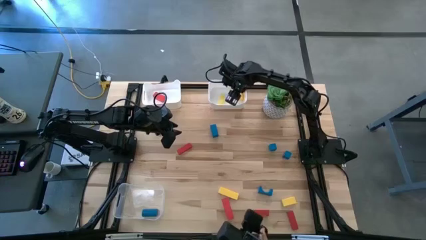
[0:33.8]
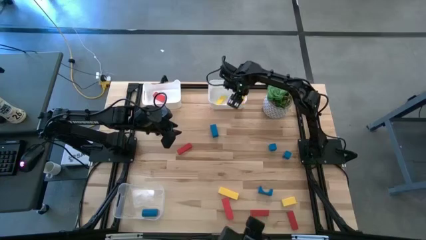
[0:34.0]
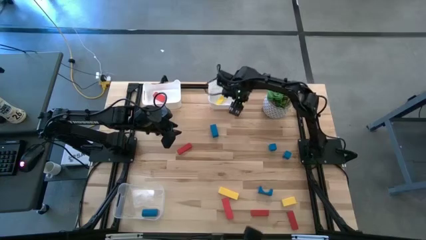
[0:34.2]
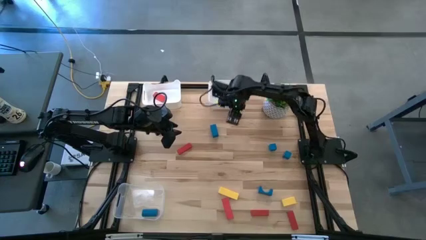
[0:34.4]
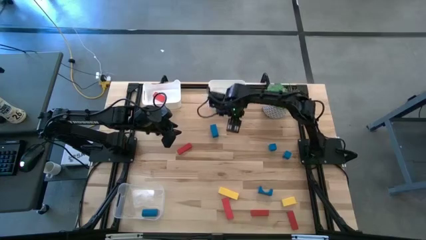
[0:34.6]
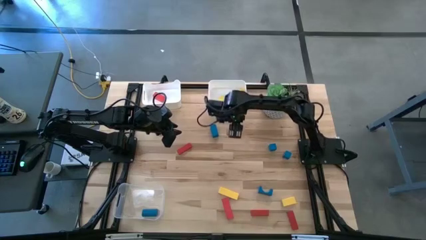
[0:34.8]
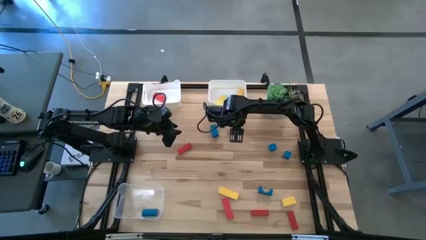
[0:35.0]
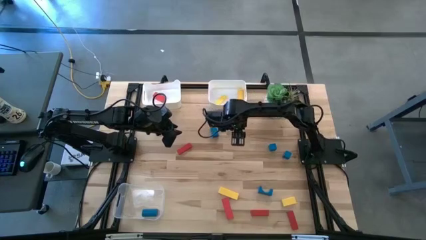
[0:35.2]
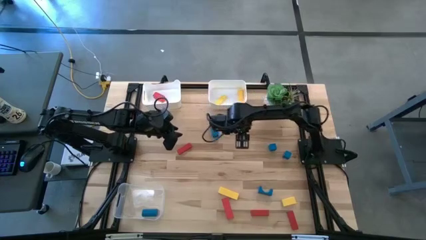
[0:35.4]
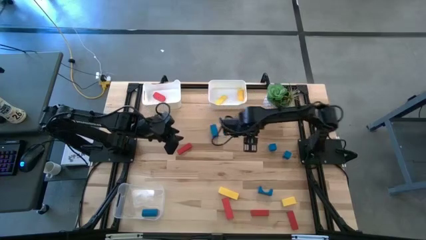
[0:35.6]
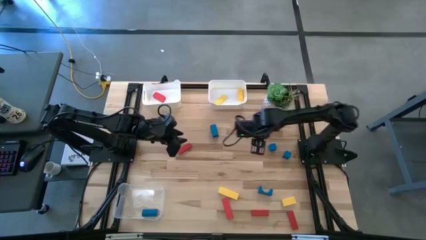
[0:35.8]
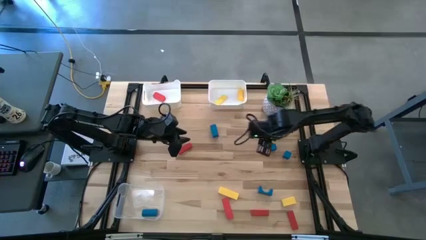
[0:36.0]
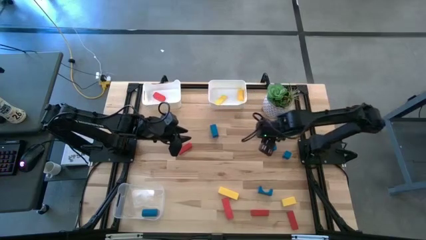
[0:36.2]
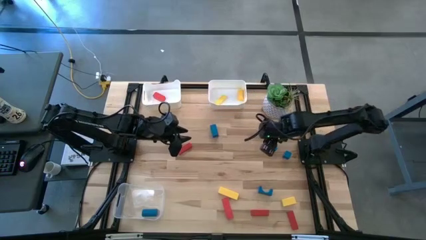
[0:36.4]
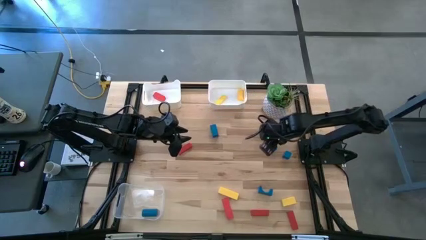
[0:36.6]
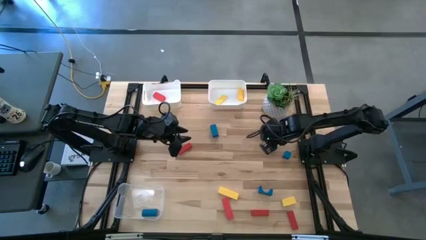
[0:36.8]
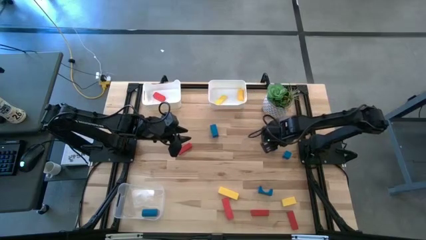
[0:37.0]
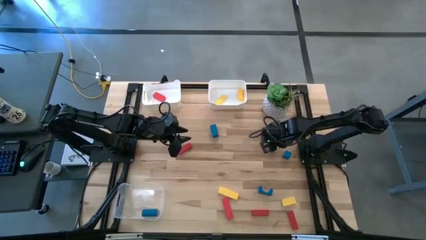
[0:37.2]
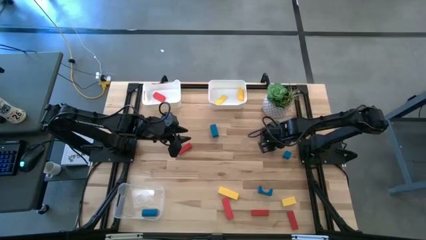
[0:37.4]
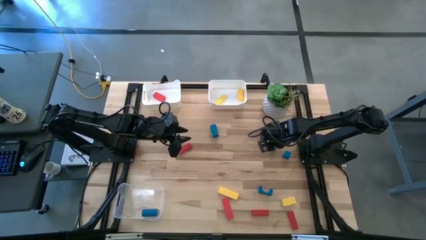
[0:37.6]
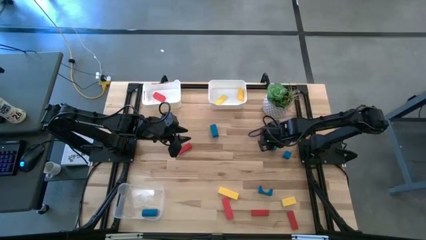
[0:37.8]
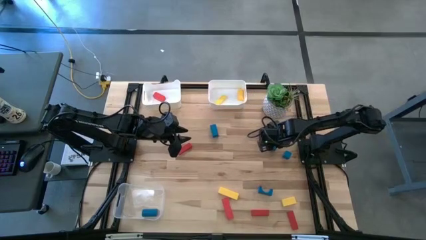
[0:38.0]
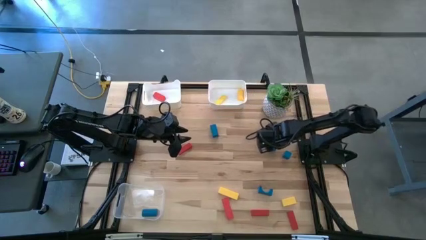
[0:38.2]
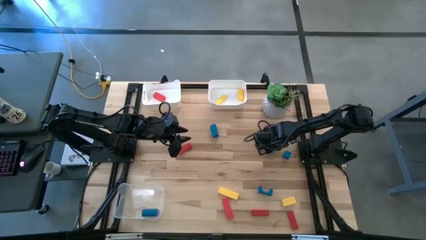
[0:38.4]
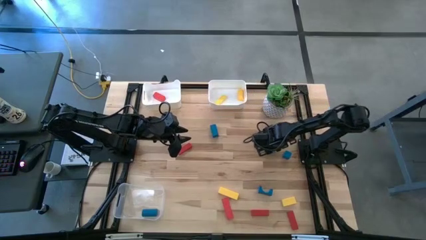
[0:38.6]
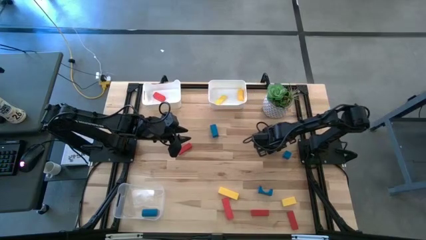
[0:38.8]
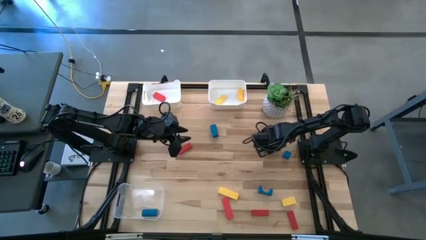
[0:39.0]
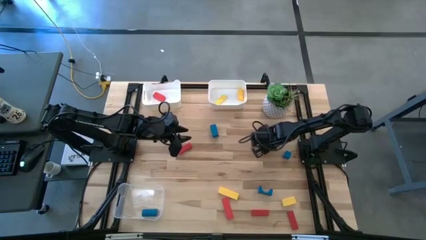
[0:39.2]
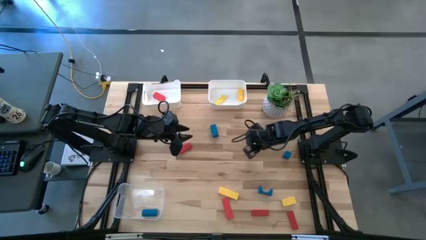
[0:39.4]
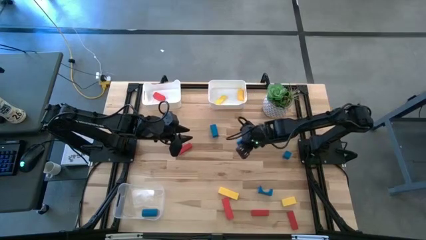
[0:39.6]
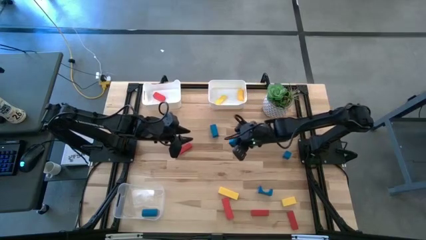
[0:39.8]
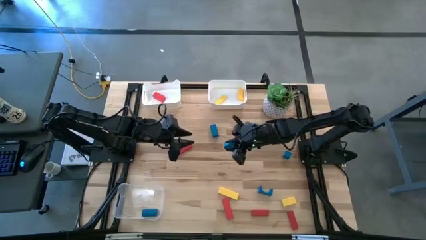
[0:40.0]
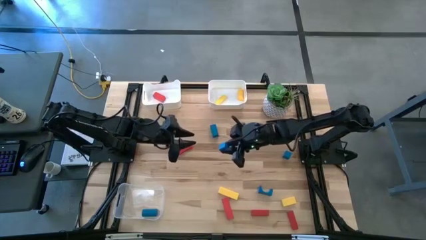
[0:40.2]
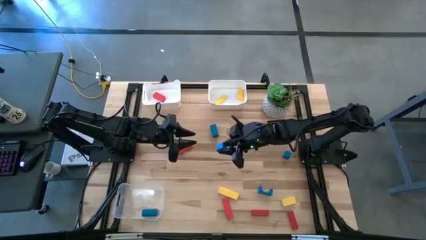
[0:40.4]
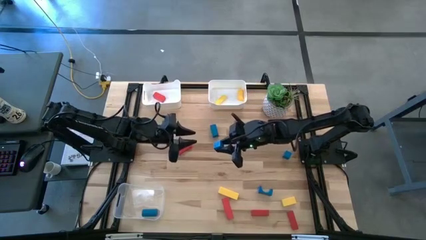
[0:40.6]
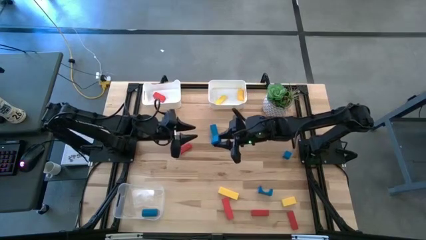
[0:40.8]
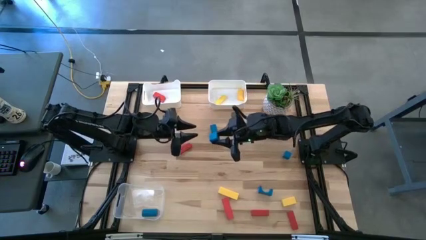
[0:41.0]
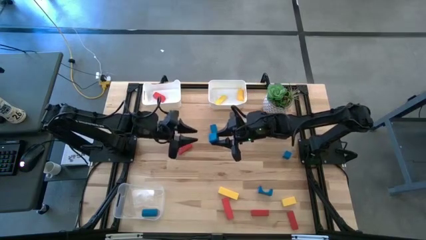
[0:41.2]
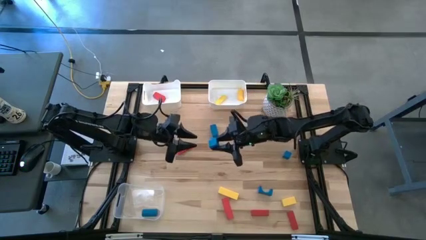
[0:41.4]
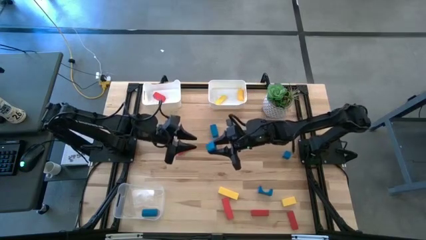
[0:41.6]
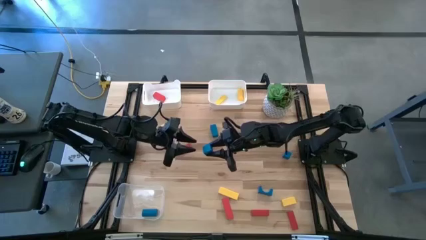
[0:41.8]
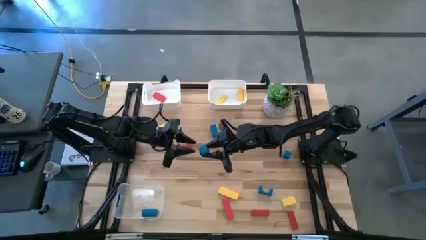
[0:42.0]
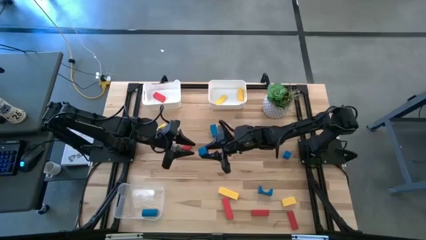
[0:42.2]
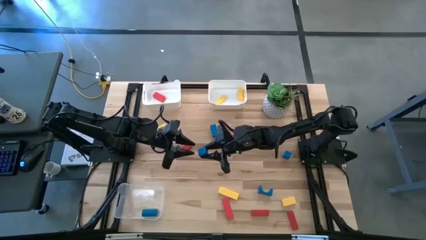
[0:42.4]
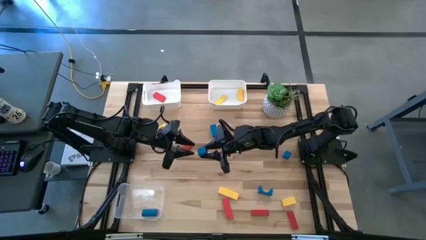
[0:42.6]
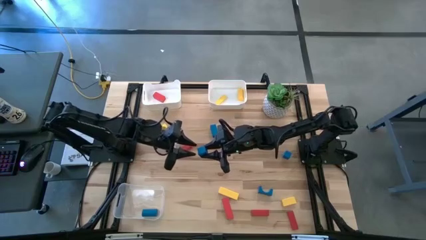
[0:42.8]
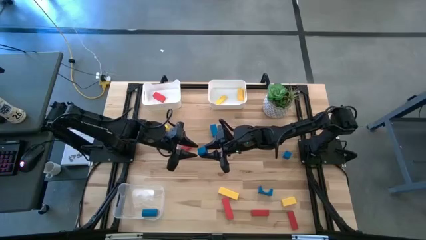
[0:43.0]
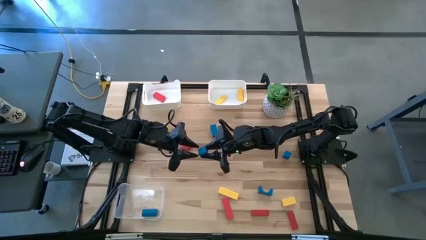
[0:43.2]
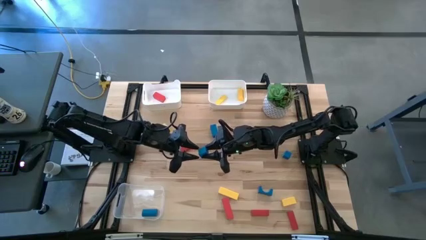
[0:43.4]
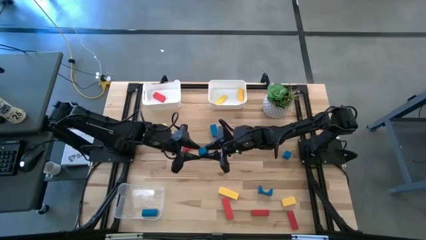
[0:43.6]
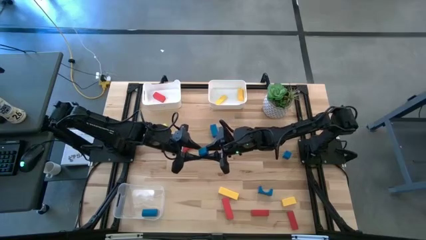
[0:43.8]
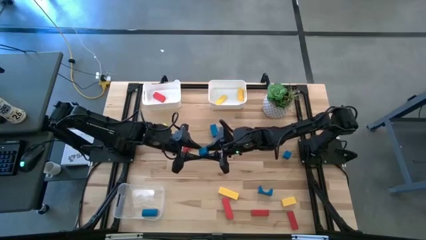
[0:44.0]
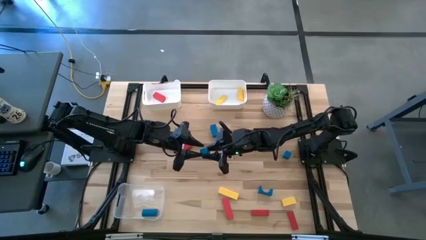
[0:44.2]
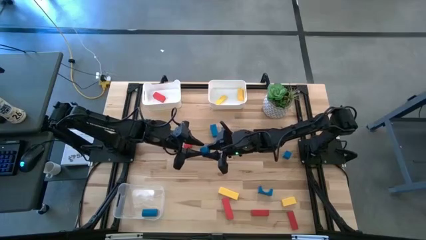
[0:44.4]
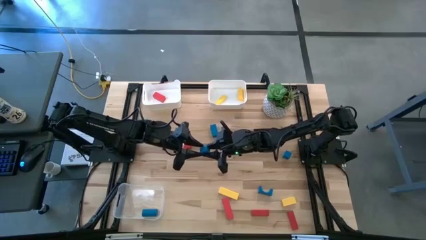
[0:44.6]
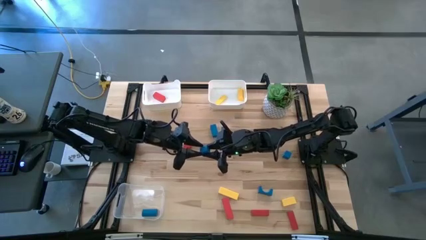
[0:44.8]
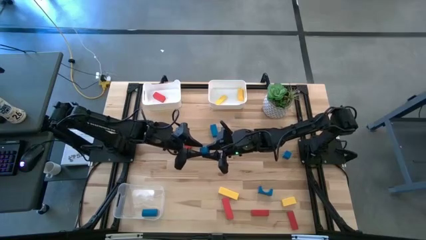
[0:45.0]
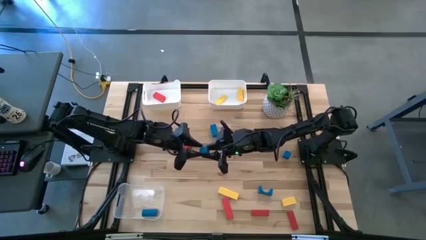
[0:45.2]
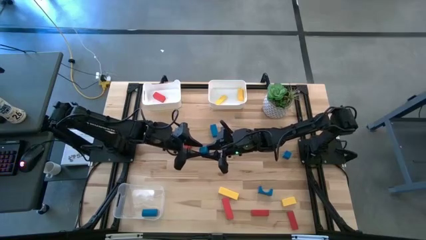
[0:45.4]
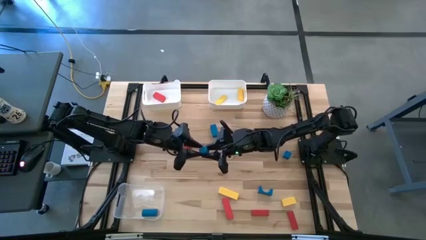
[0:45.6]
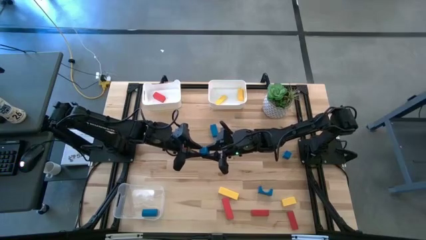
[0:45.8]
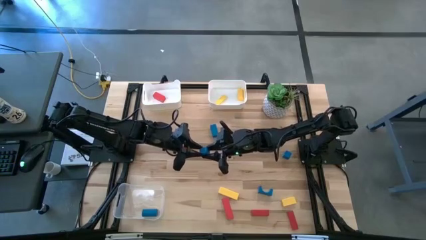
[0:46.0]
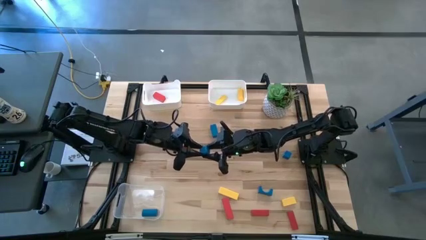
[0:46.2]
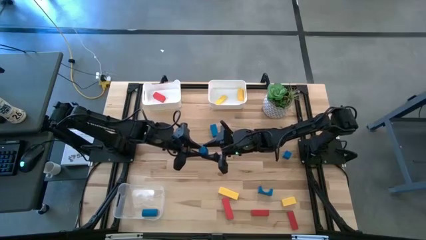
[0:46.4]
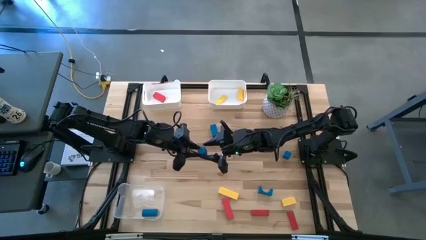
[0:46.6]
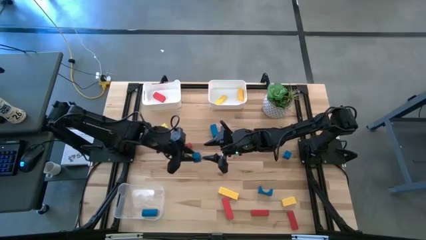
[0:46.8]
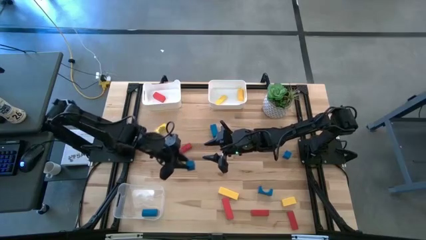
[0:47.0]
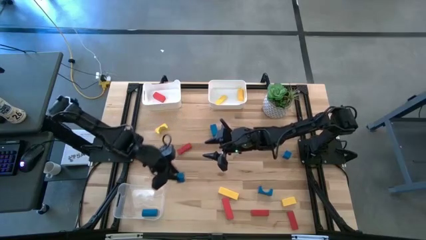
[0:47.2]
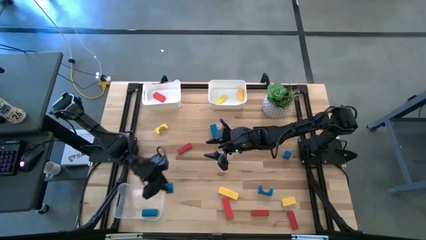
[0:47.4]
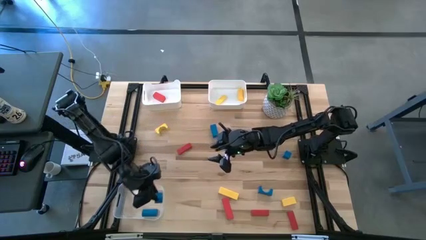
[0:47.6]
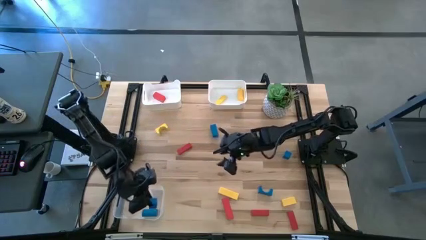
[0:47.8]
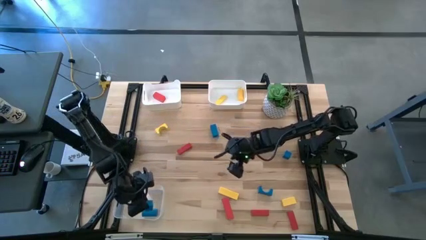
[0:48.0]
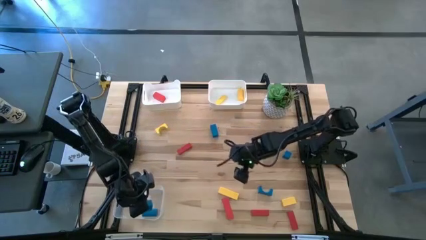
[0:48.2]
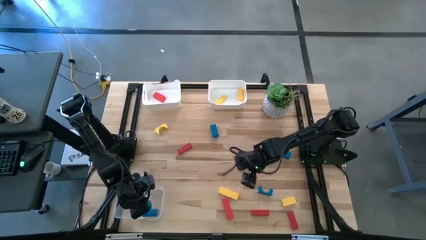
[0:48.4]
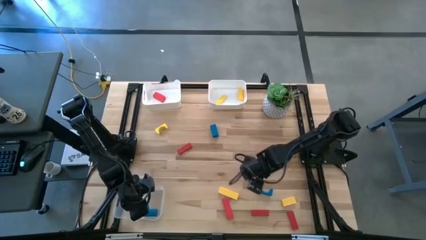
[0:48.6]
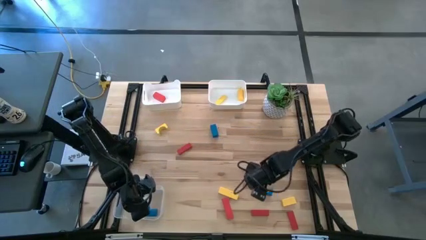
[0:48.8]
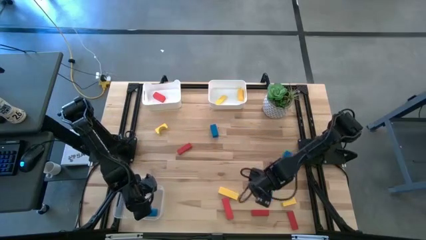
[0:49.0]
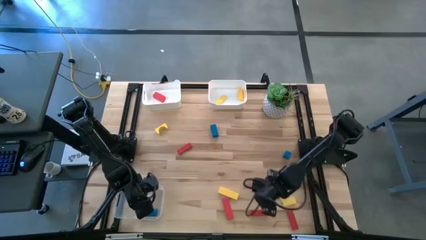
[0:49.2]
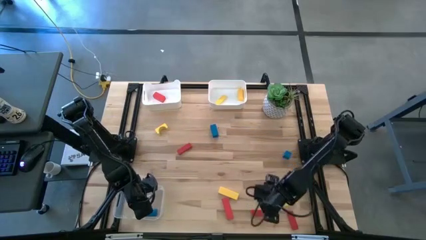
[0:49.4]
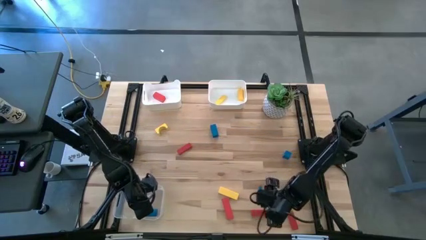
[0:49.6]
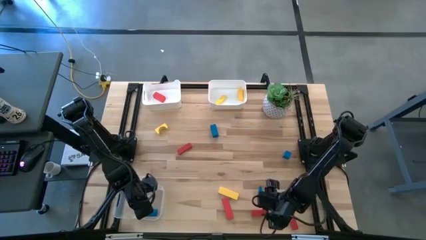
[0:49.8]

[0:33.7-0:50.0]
Task: Sort & place blocks by color
Put the blue block into the transparent bin

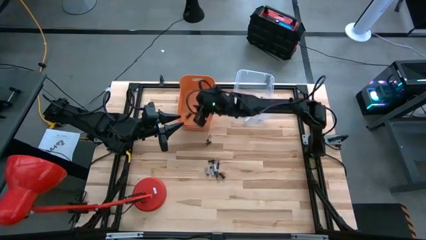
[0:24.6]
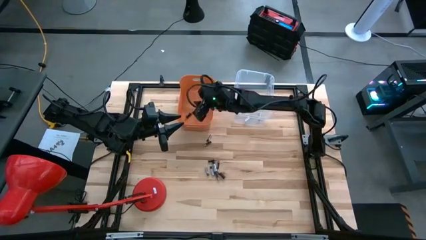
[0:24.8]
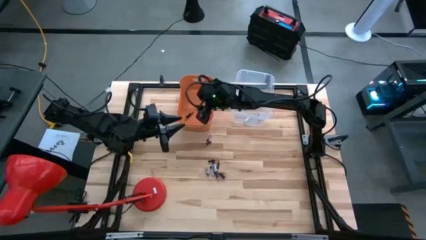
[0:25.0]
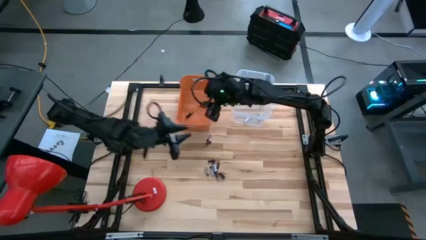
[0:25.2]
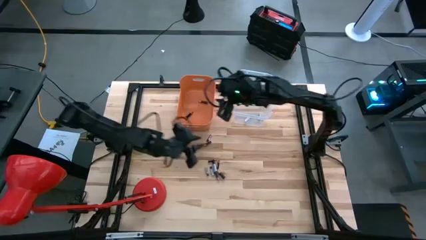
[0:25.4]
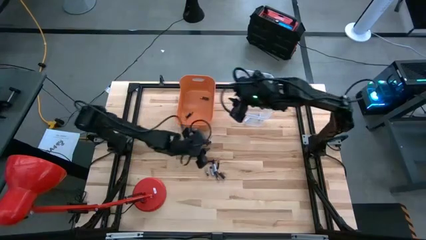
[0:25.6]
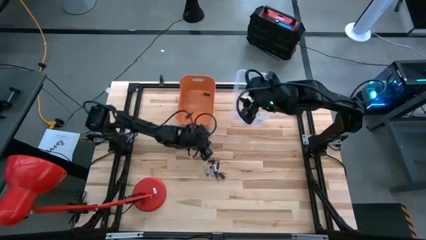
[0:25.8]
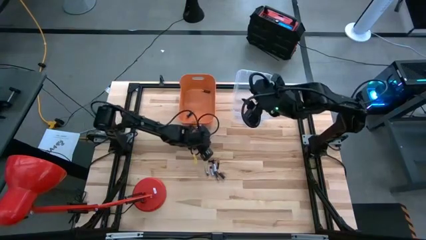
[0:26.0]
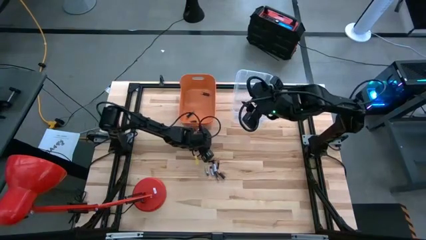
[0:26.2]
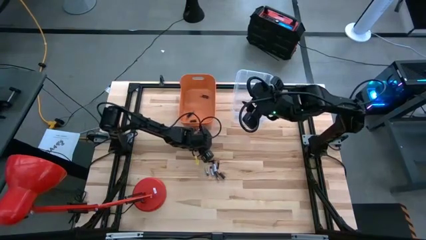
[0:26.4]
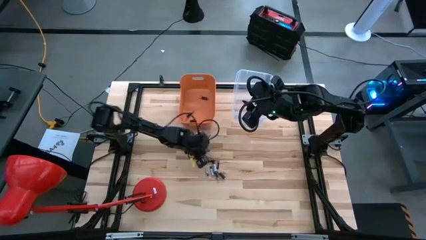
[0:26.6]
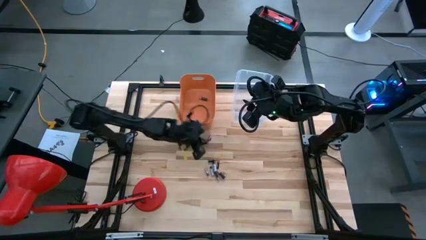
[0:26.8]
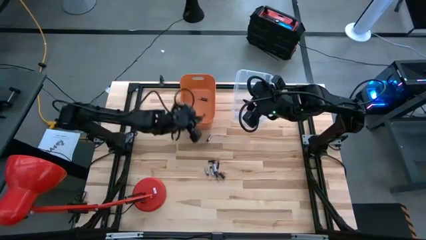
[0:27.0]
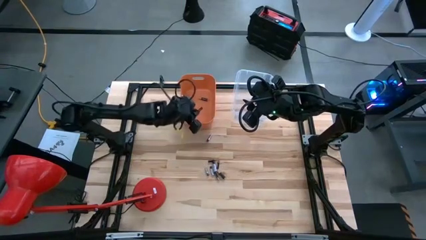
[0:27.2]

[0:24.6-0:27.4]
Task: Sort batteries
Put the brown battery into the orange bin
